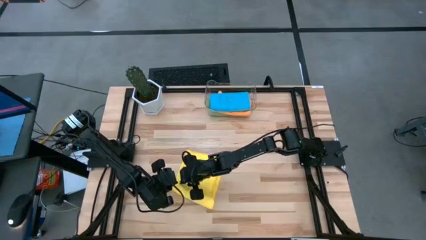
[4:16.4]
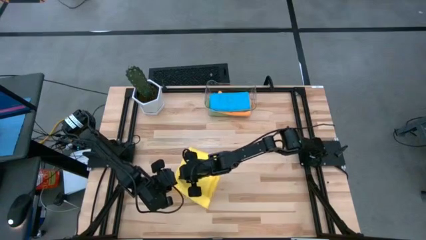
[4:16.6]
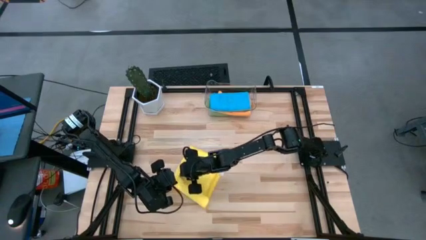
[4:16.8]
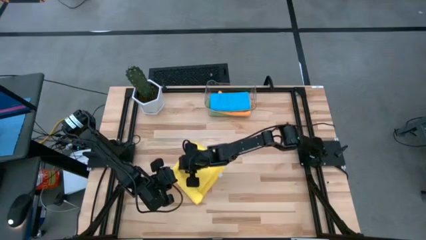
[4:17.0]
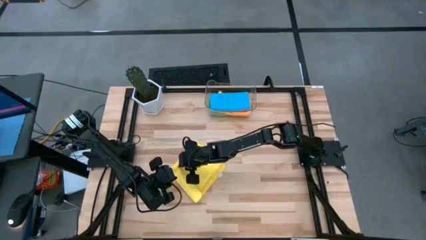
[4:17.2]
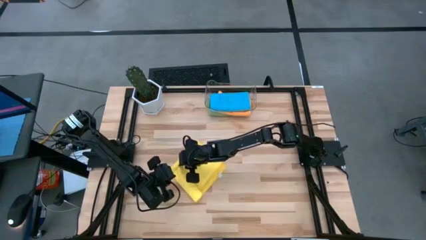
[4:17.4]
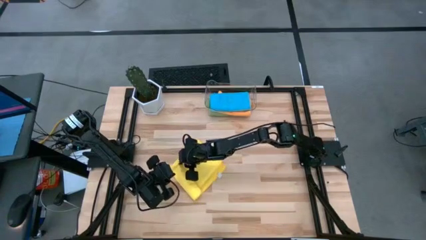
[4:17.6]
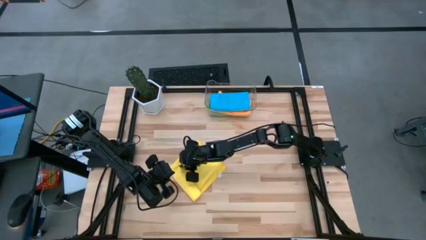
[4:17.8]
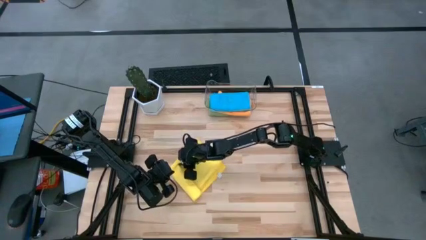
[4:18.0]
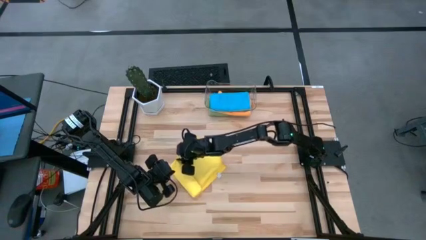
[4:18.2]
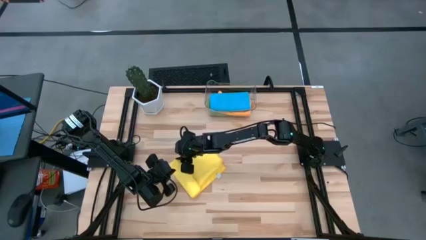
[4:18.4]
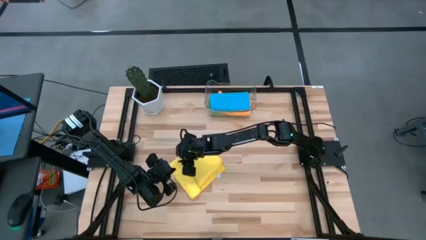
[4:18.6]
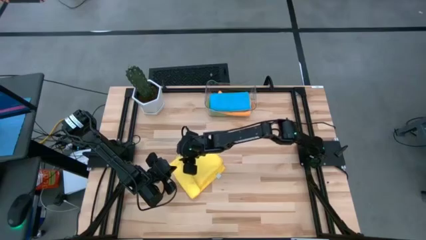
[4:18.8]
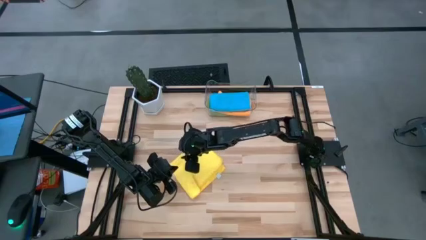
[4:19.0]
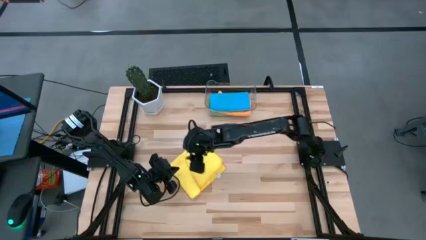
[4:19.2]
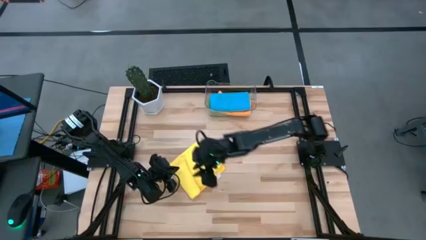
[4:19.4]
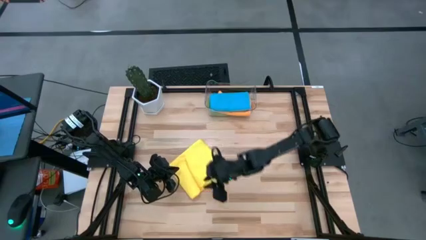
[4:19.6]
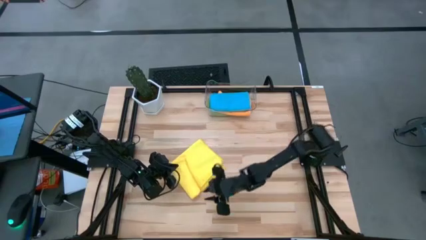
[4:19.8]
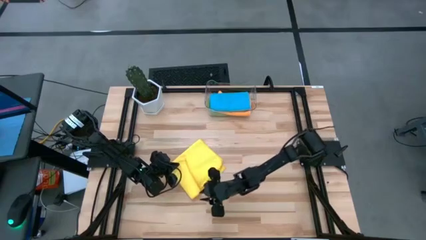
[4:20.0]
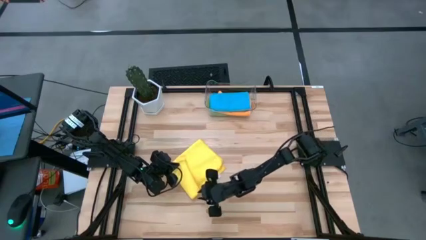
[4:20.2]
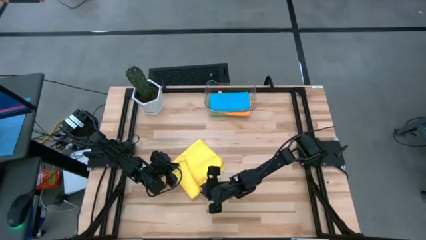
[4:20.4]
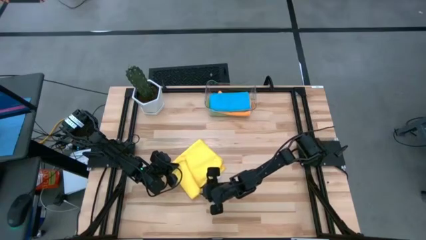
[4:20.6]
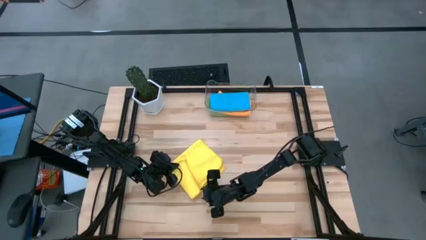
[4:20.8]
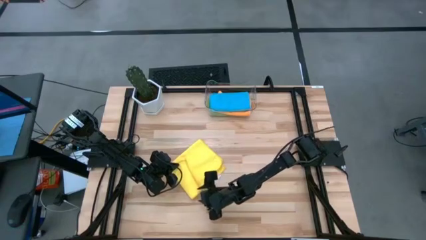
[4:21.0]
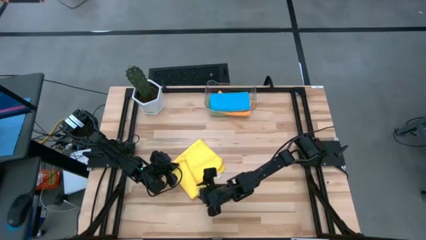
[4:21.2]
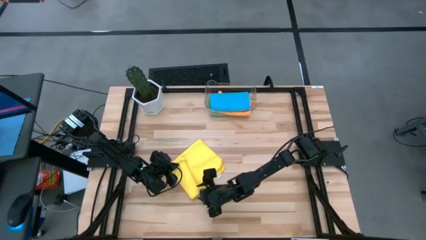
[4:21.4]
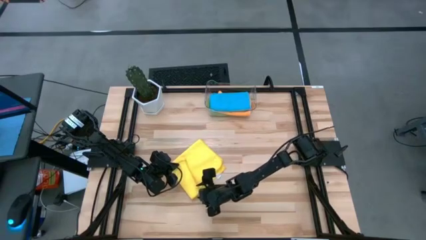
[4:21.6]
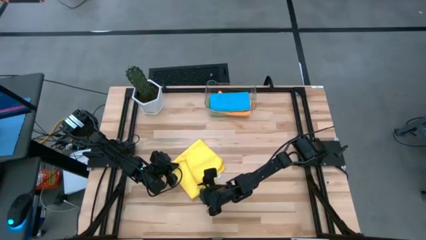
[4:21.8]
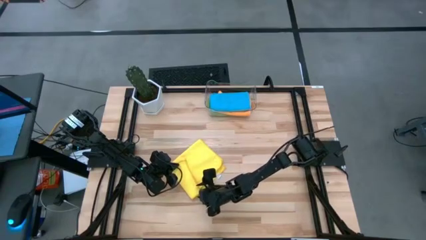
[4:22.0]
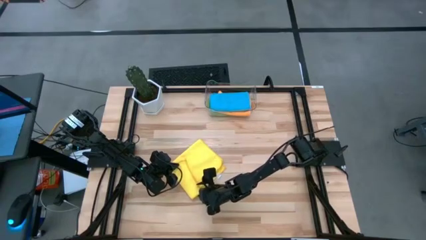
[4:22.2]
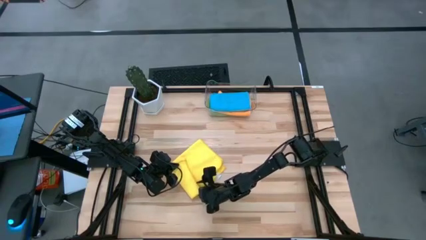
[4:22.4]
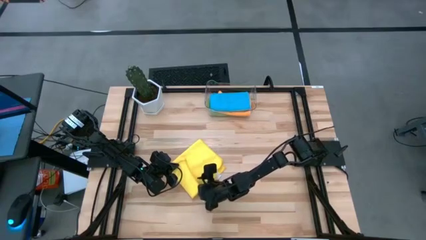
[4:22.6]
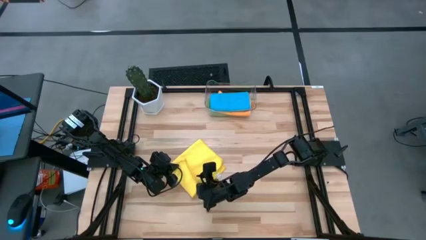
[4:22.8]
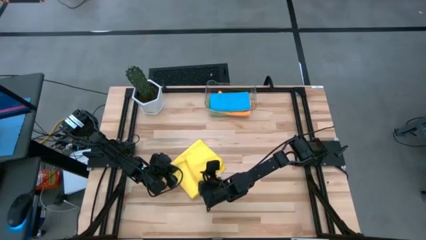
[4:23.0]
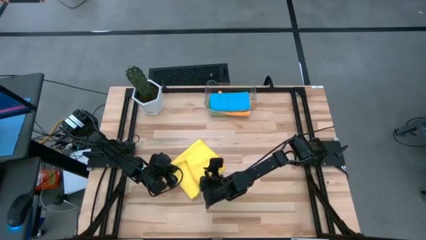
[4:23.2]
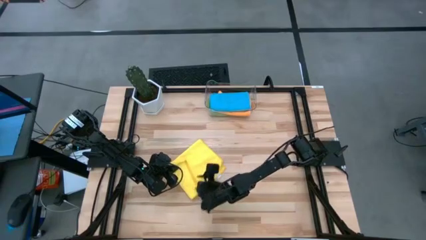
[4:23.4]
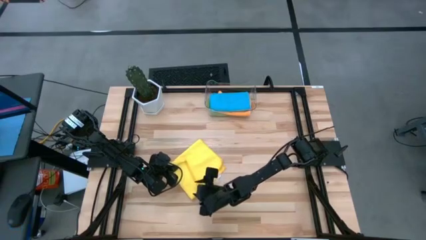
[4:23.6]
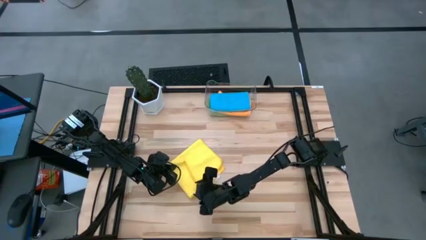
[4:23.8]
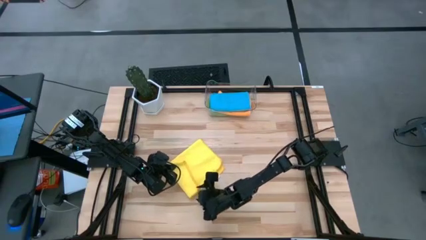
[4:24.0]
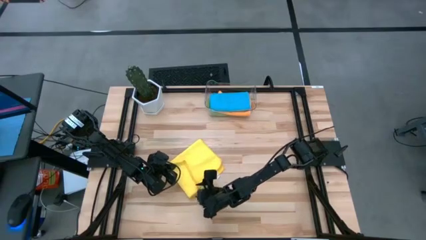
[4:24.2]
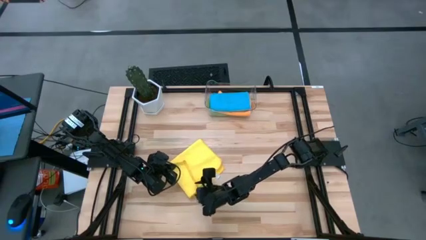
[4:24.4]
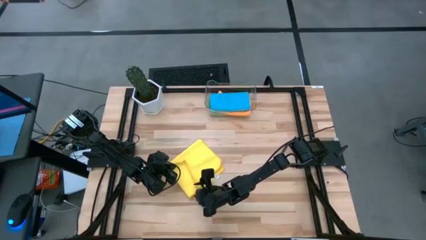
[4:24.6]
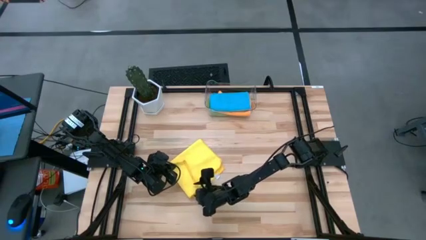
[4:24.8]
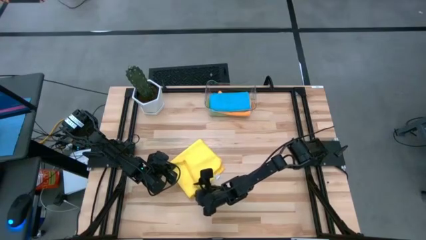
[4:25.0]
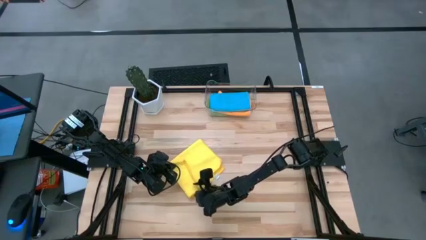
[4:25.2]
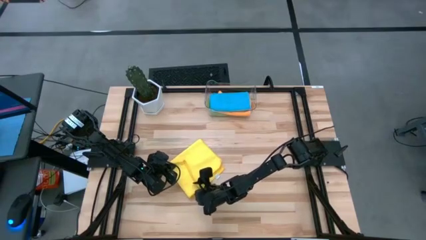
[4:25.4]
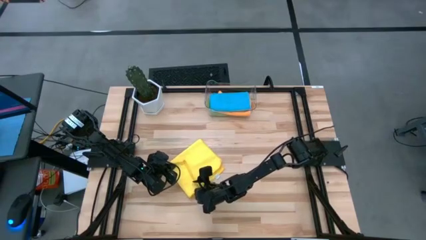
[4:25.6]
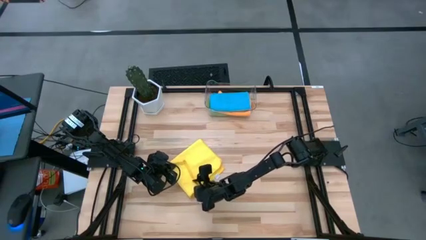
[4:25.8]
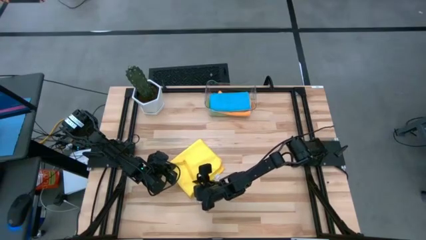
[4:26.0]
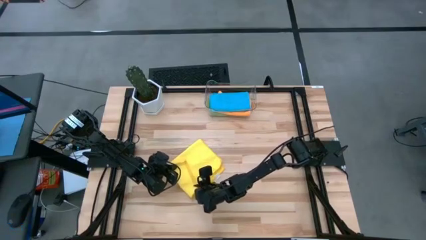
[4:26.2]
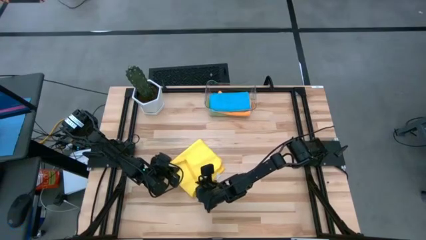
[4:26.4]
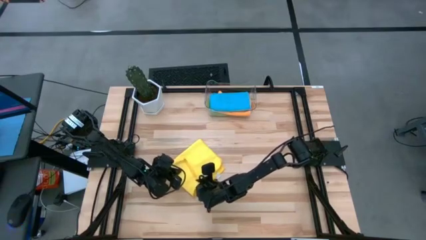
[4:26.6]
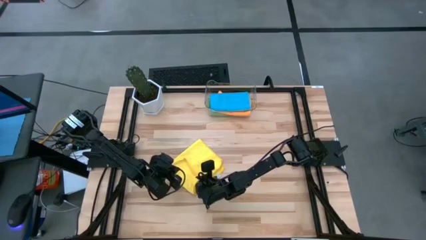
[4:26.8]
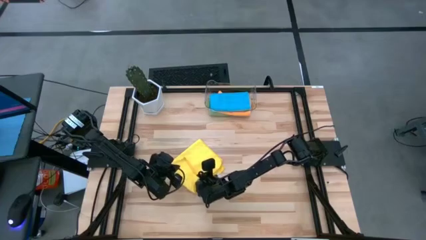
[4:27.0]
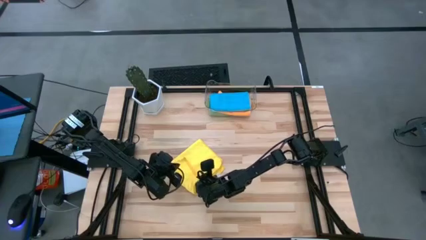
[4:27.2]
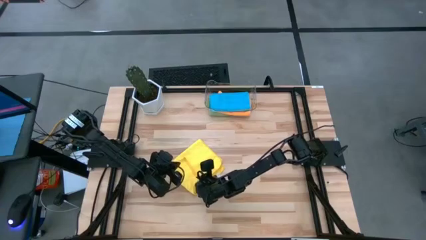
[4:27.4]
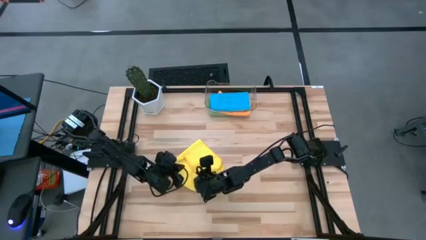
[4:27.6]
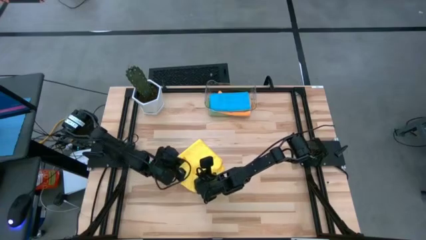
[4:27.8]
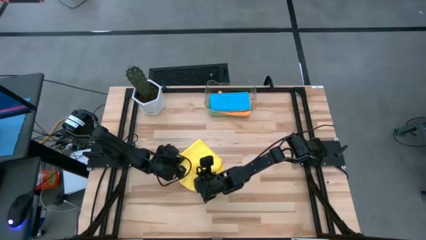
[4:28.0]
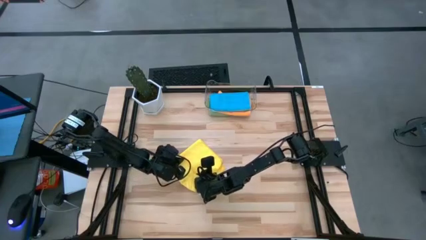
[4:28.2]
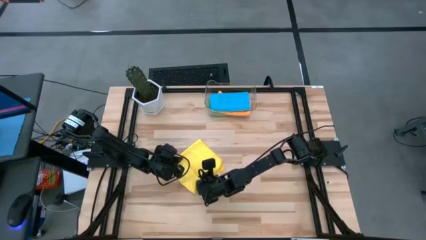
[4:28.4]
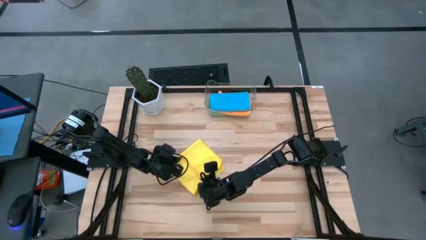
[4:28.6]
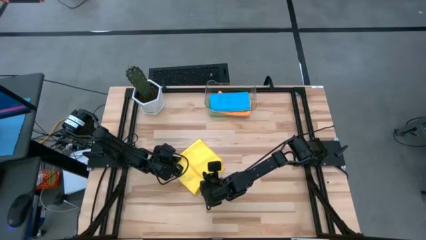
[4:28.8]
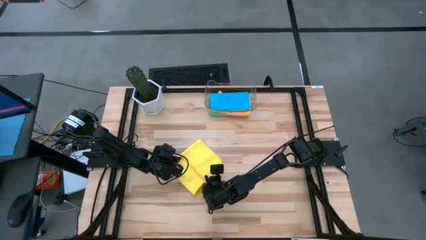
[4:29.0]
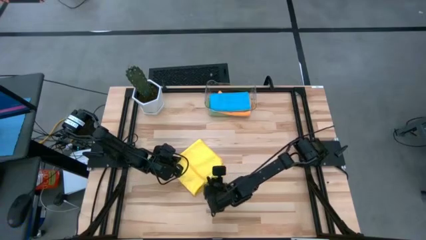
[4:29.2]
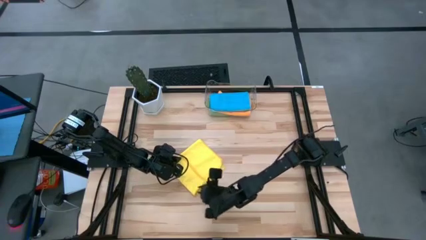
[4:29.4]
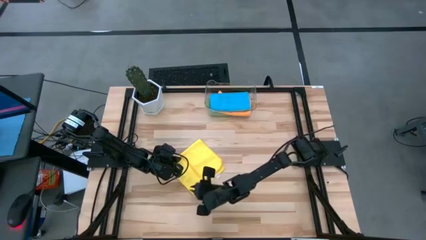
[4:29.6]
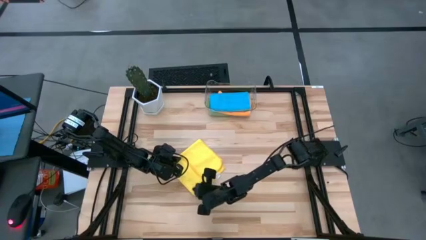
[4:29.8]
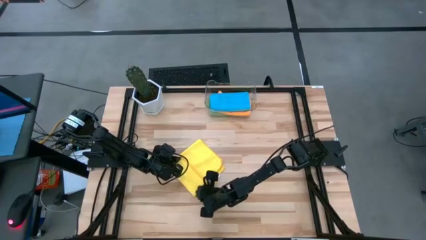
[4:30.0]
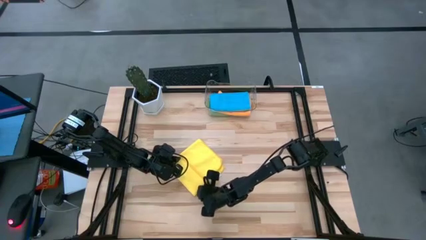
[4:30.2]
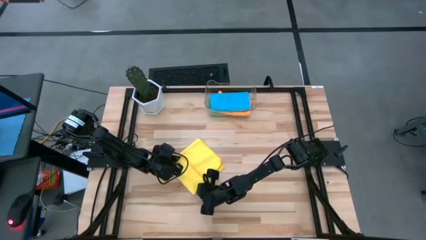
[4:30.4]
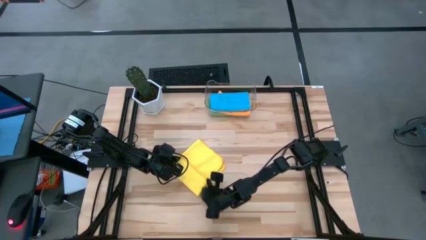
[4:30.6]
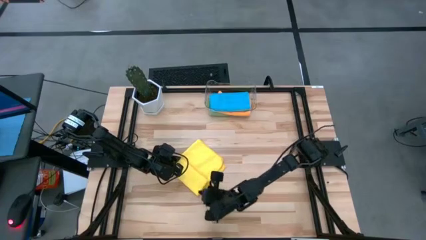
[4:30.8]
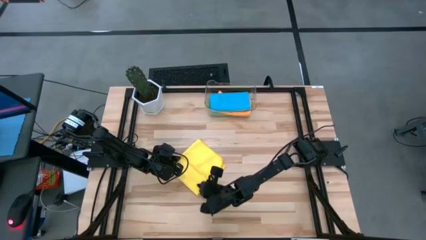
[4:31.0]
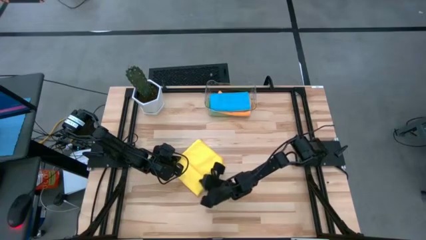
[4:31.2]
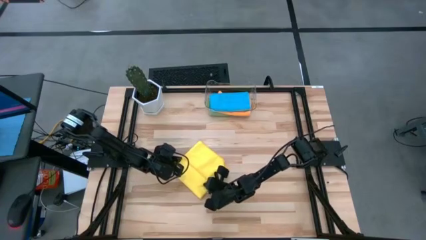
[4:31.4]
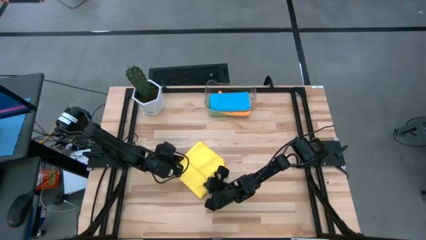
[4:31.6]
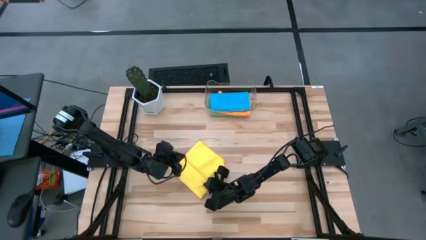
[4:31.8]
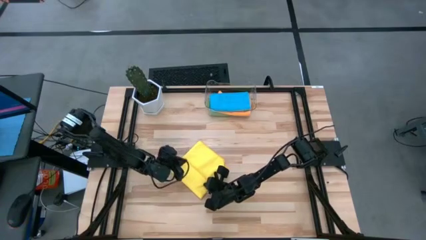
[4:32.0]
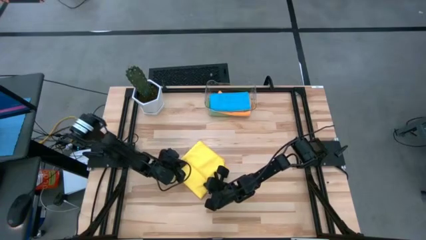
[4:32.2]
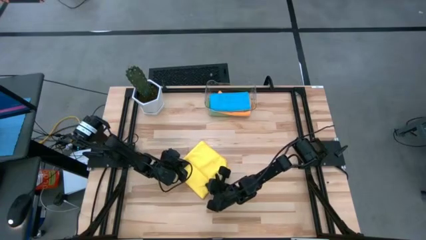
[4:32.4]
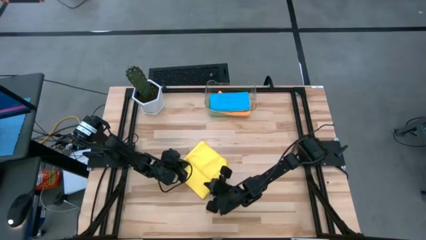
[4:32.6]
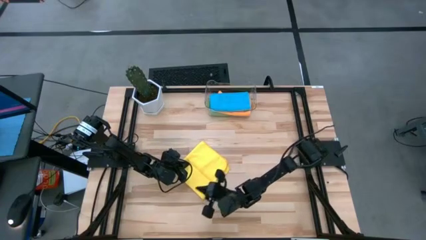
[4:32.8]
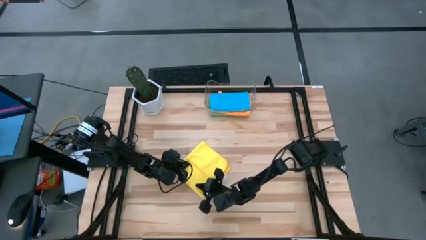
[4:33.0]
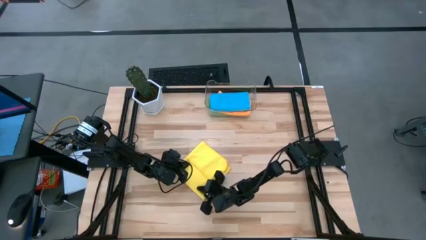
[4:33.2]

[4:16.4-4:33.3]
Task: Fold microfiber towels
Fold the yellow towel
